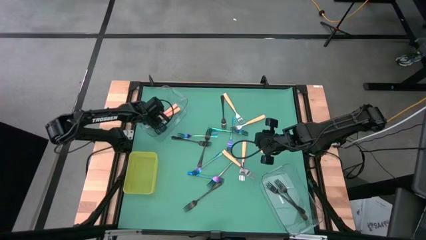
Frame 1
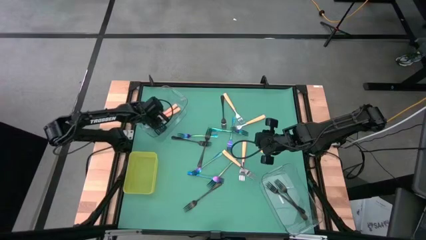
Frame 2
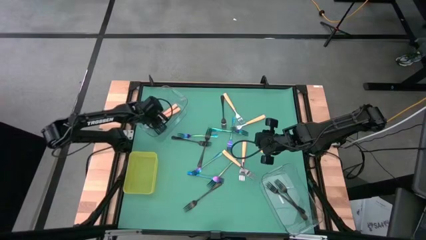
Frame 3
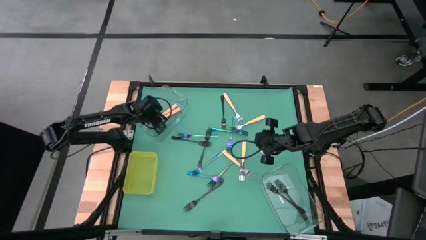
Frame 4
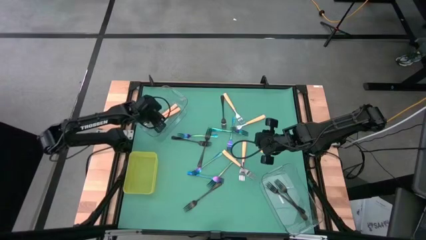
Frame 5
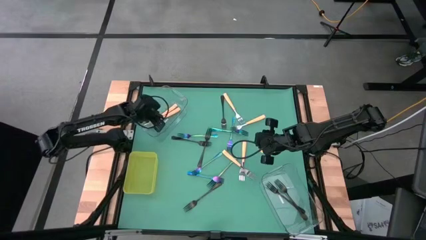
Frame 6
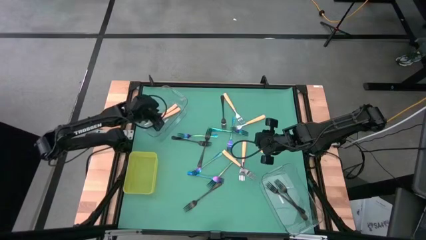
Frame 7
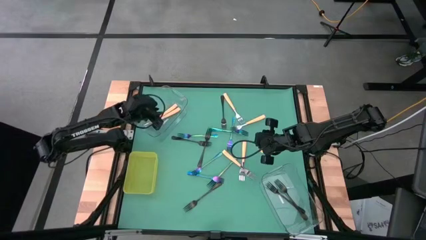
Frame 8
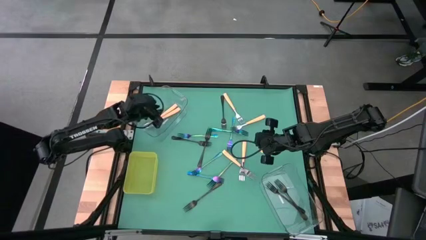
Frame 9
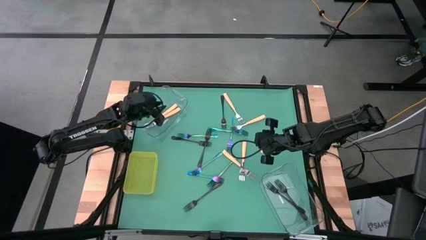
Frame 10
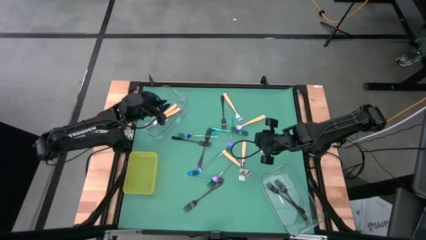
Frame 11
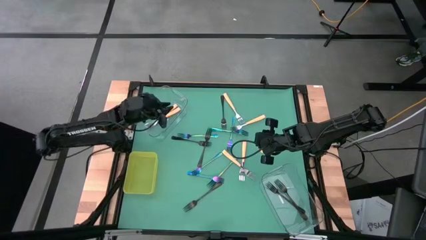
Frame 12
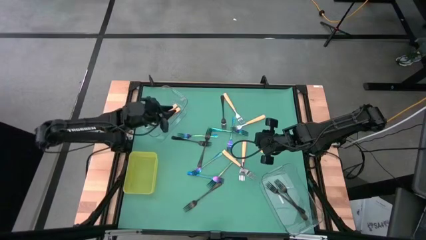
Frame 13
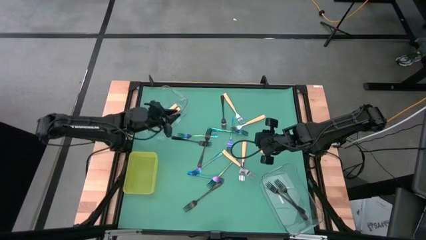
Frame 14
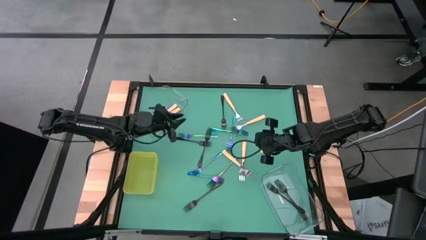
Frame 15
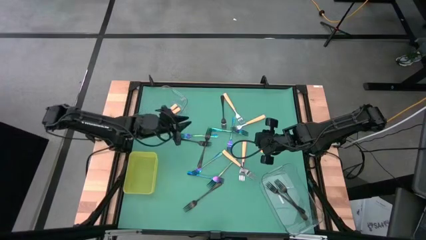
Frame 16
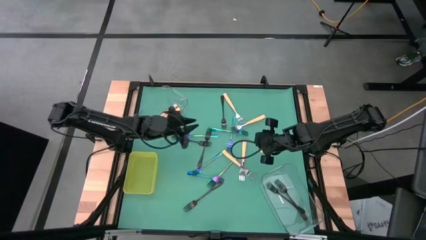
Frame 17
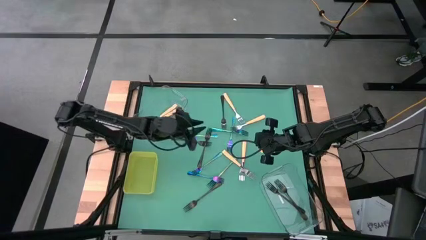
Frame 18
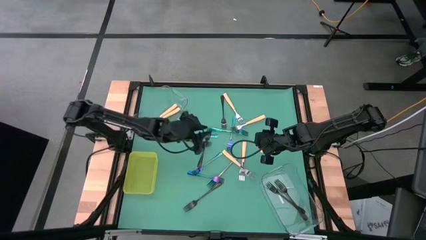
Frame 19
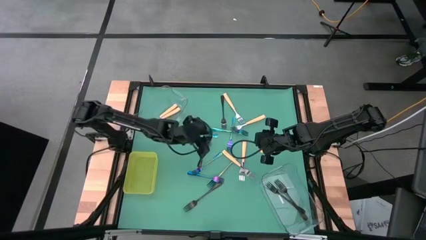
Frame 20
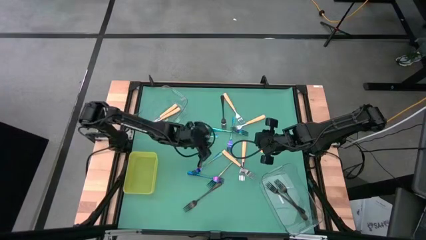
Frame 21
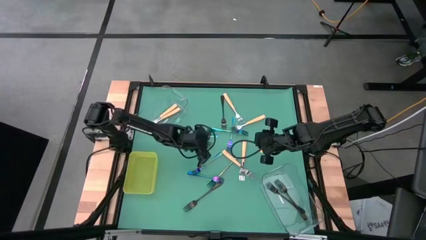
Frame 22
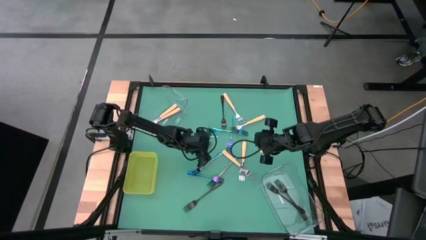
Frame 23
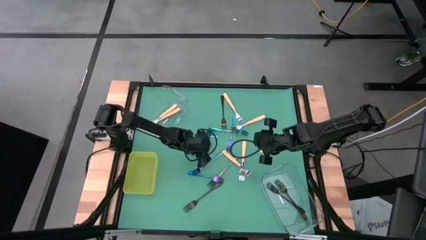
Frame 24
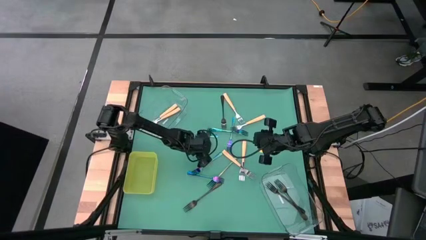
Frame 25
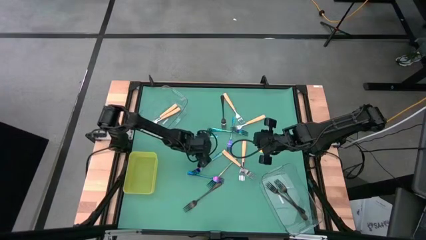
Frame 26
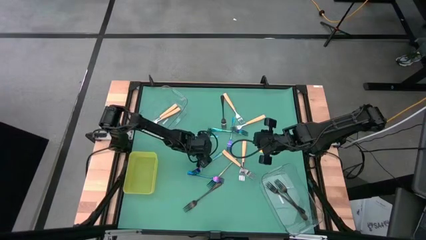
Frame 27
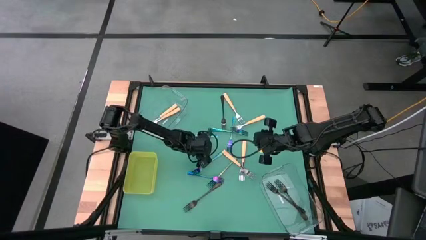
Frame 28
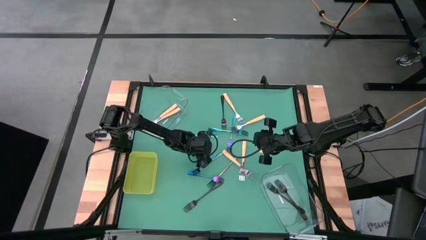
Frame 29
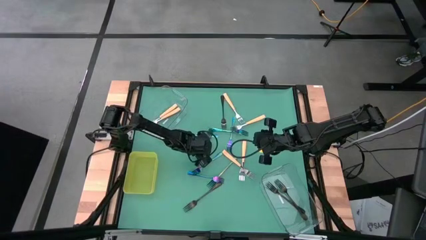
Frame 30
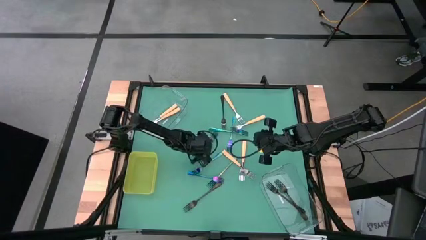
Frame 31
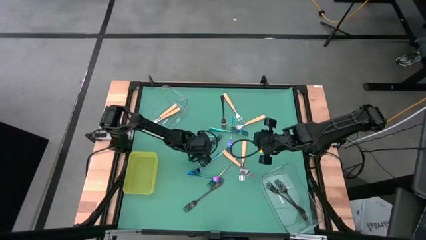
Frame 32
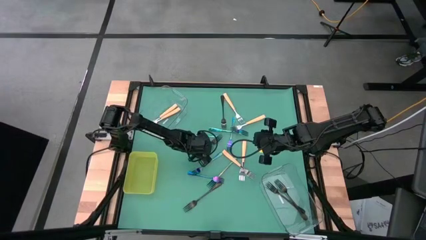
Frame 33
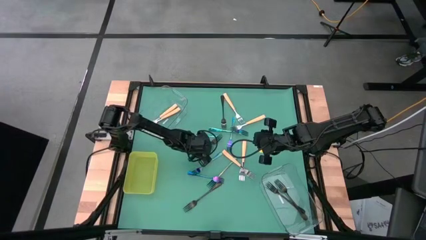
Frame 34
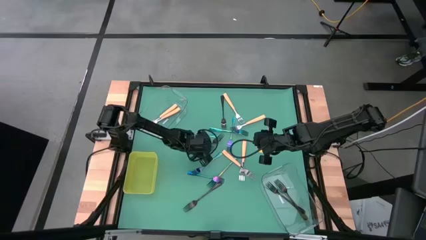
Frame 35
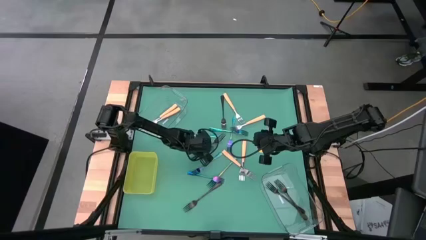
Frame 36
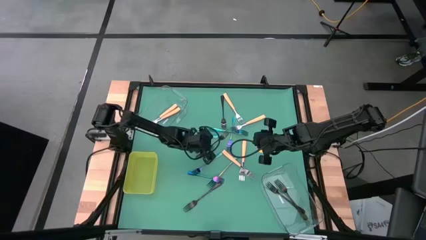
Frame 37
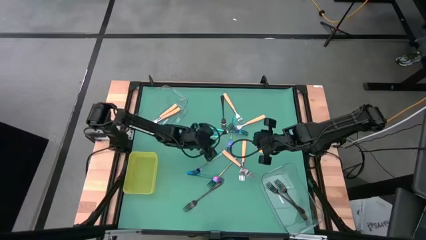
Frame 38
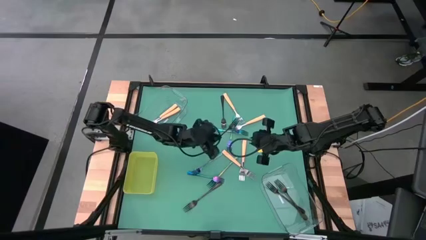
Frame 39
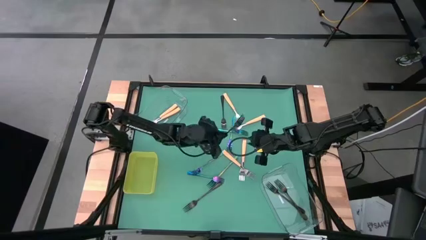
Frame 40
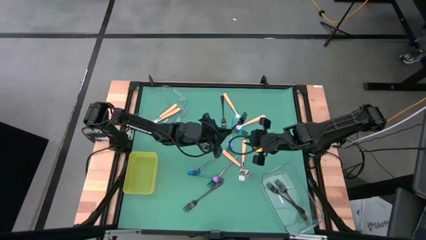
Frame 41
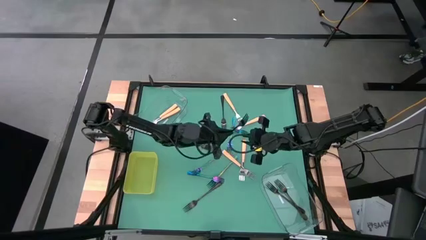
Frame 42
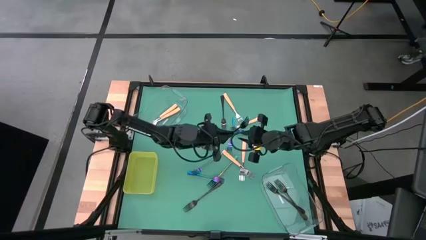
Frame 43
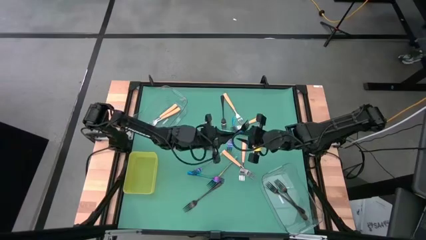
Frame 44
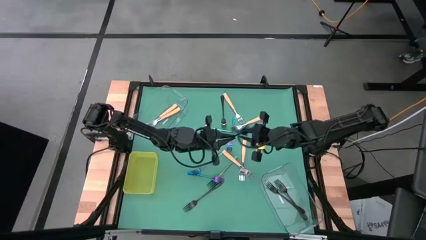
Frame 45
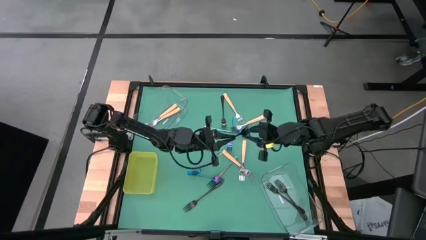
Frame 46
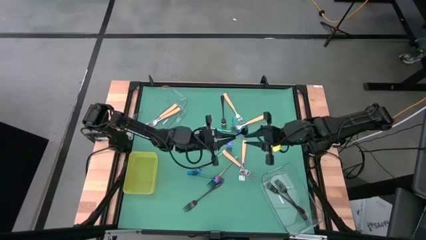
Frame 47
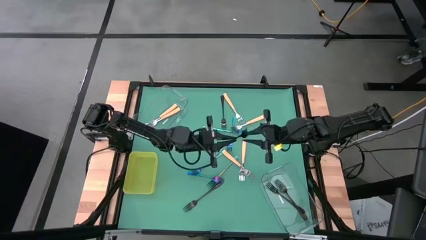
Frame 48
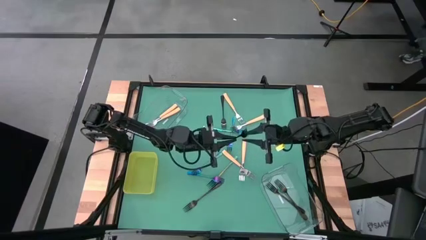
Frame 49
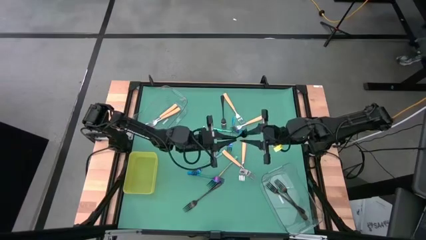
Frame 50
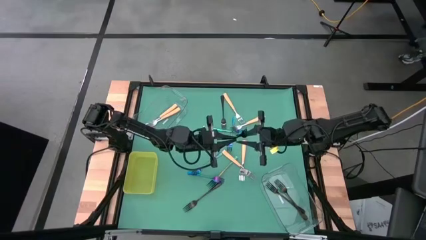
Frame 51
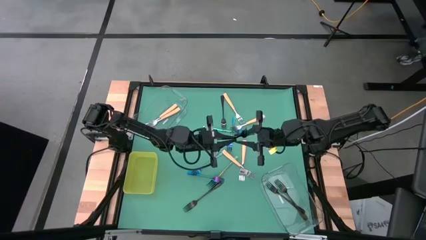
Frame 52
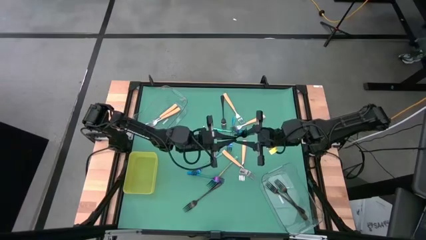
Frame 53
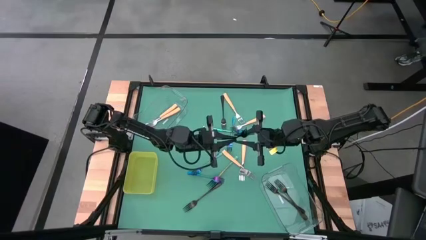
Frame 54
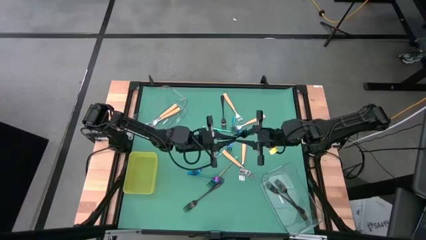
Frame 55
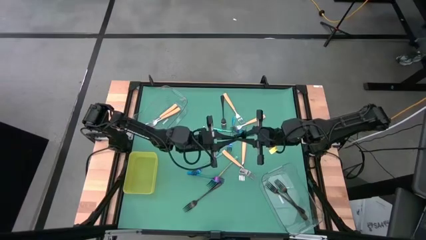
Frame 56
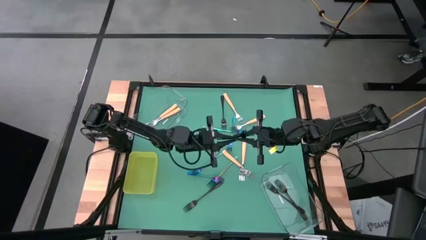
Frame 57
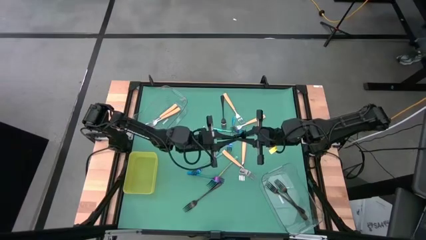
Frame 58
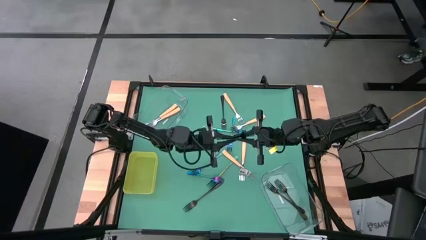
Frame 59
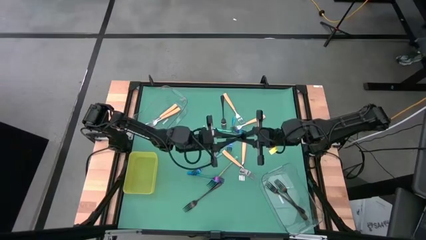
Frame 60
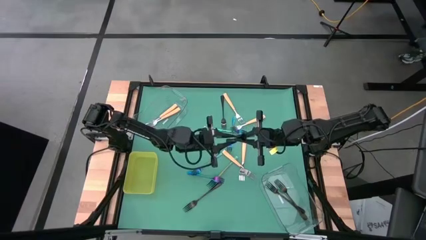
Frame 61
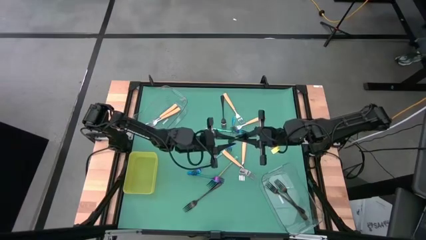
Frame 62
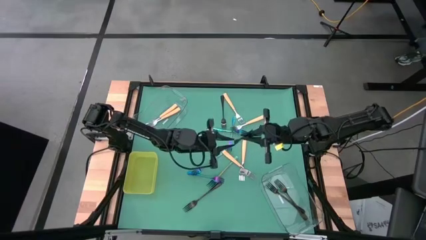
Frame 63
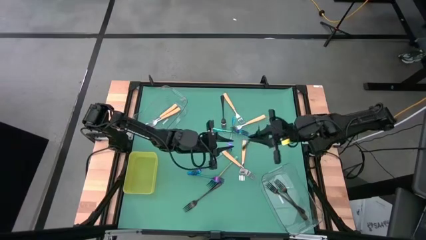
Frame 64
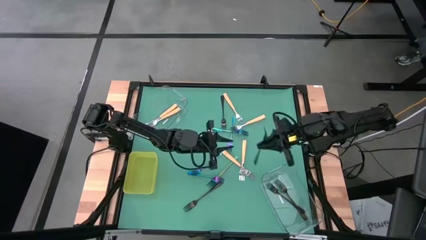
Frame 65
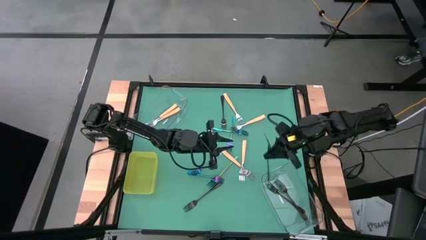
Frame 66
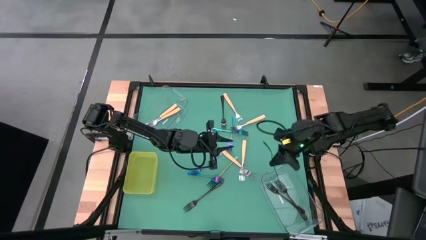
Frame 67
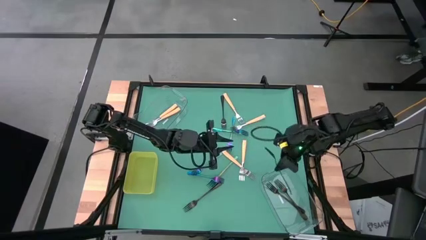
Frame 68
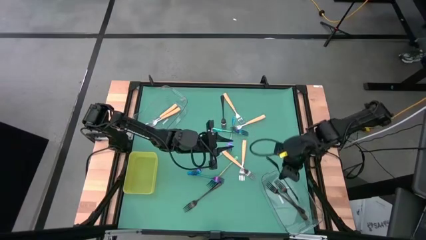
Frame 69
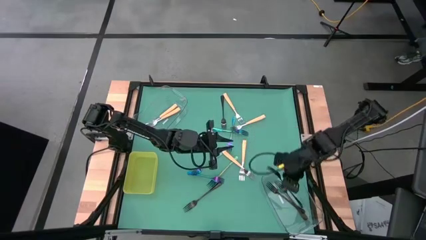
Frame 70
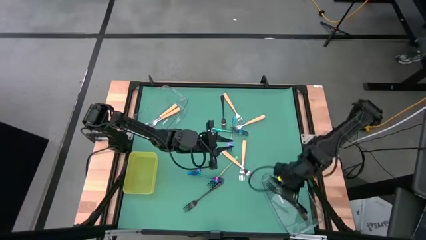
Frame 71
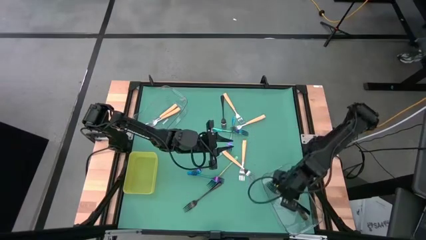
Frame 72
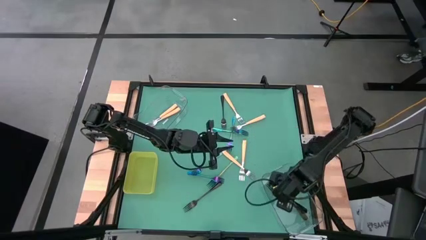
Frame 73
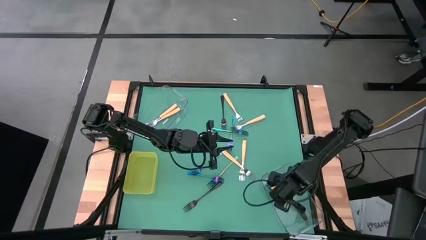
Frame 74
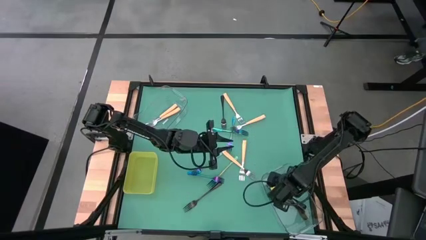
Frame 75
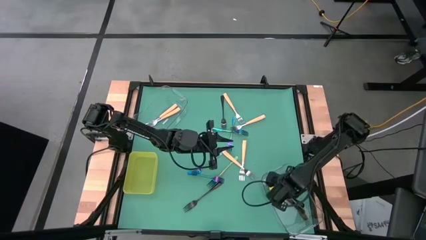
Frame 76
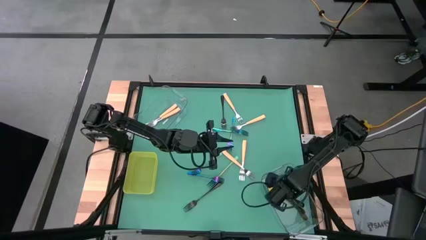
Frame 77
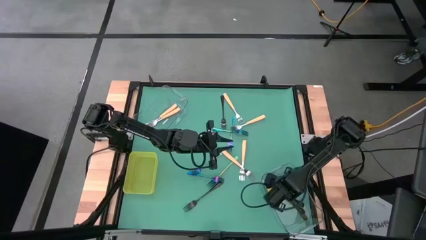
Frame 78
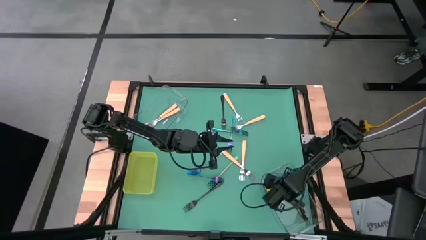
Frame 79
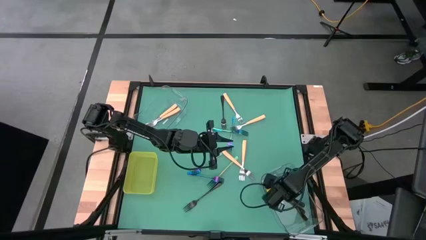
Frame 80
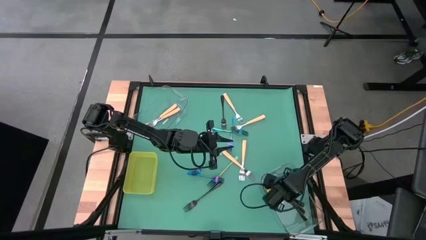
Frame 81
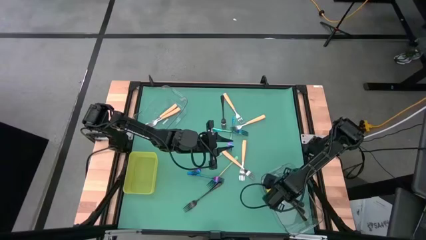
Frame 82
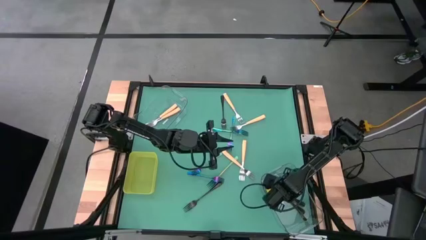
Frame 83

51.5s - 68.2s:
Task: Sort silverware by color (type)
Put the black fork in the bottom transparent bin
